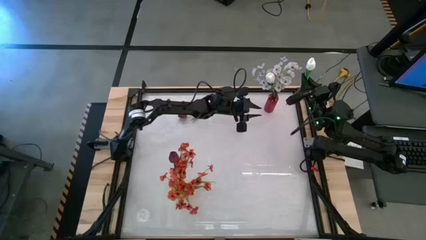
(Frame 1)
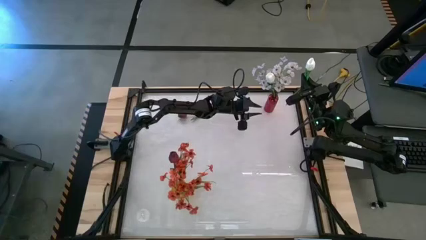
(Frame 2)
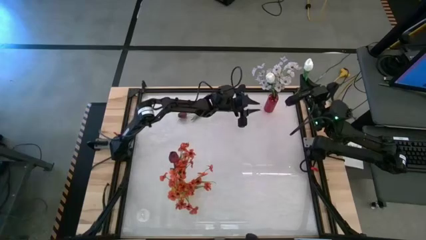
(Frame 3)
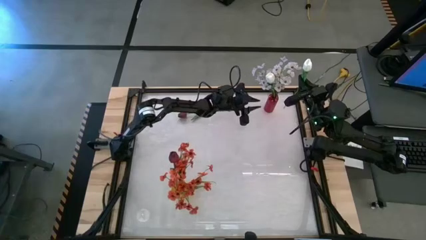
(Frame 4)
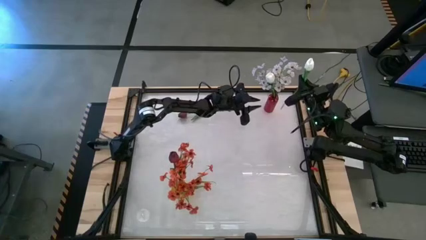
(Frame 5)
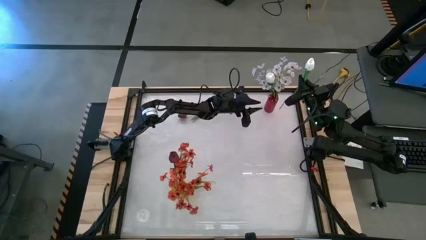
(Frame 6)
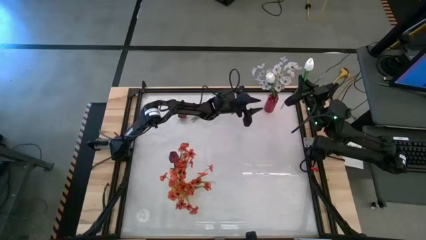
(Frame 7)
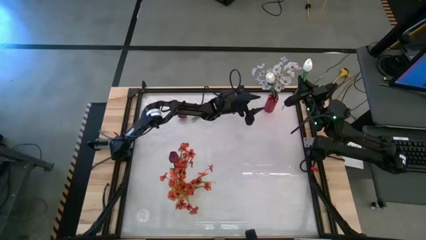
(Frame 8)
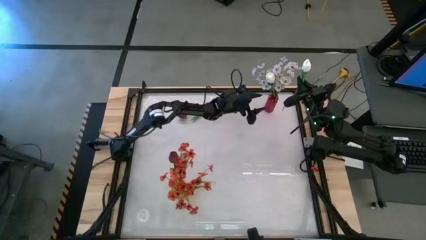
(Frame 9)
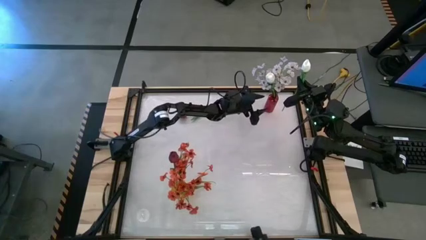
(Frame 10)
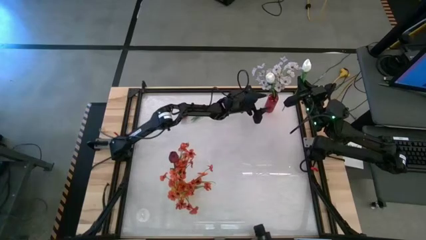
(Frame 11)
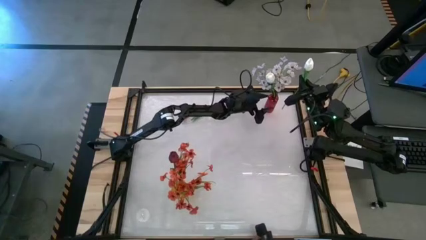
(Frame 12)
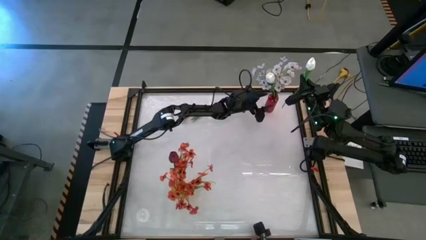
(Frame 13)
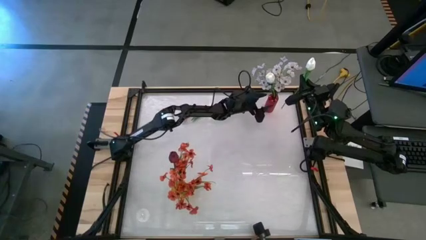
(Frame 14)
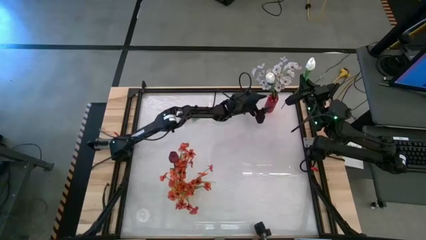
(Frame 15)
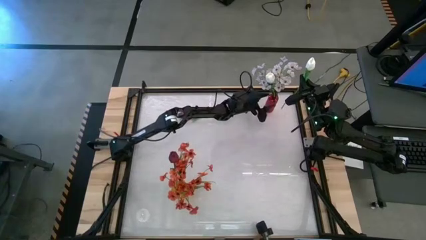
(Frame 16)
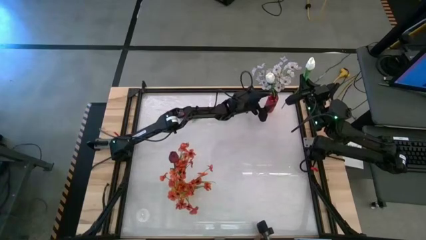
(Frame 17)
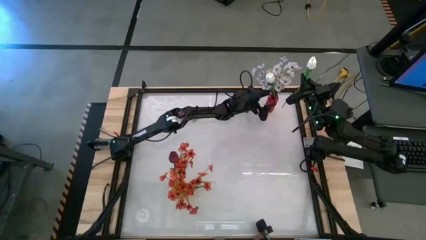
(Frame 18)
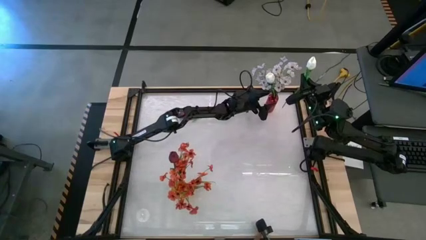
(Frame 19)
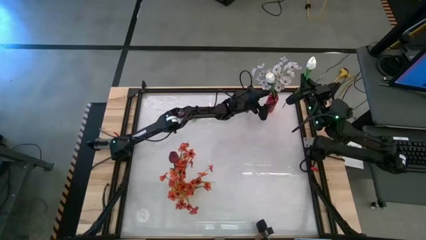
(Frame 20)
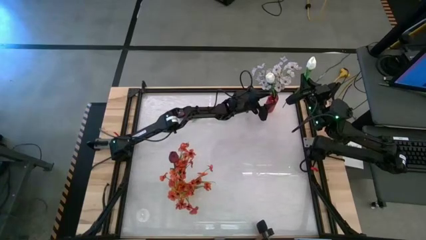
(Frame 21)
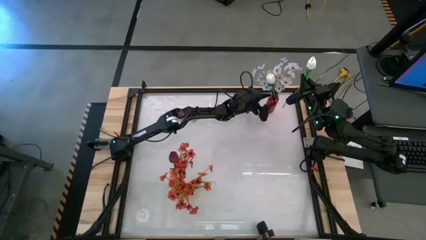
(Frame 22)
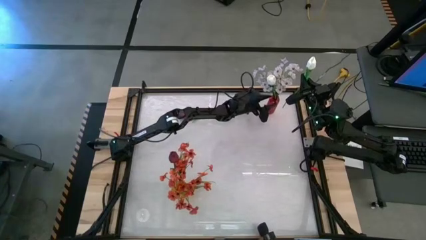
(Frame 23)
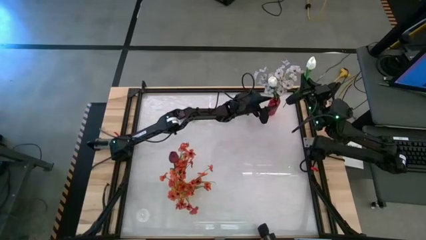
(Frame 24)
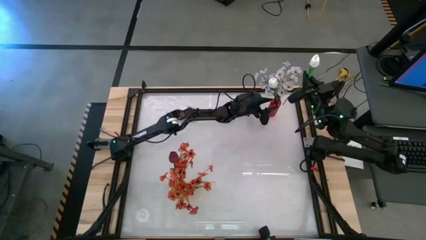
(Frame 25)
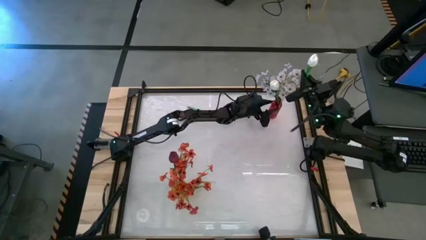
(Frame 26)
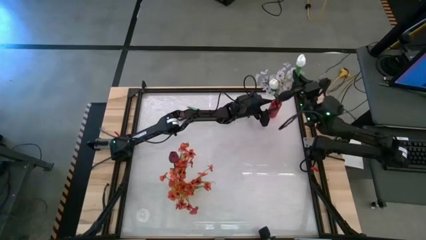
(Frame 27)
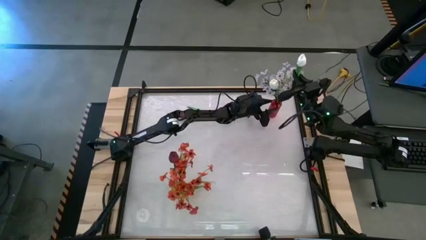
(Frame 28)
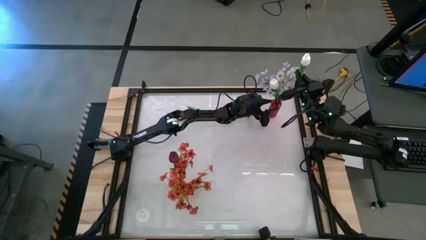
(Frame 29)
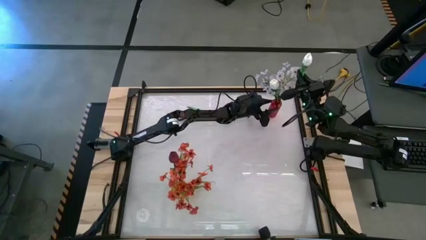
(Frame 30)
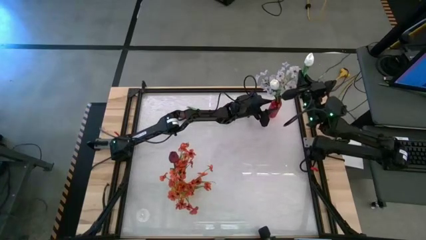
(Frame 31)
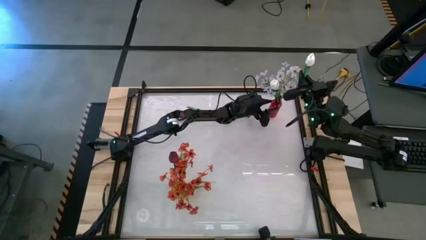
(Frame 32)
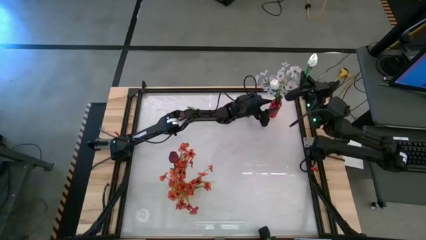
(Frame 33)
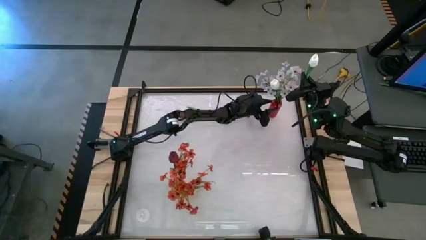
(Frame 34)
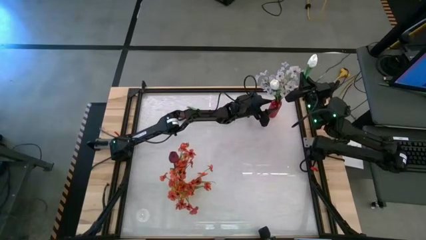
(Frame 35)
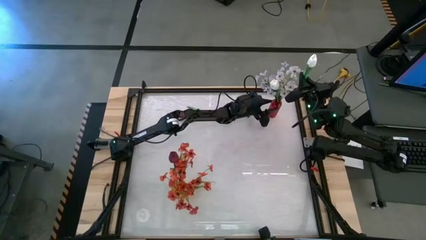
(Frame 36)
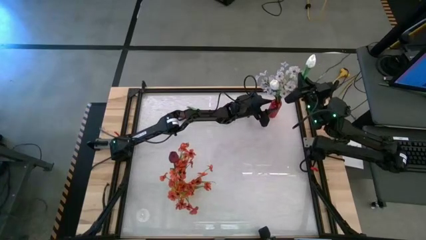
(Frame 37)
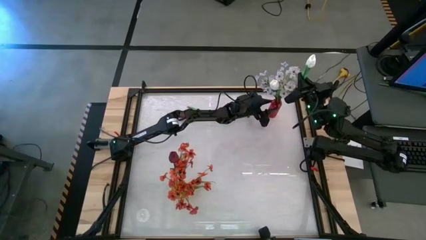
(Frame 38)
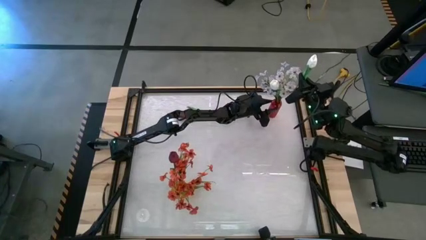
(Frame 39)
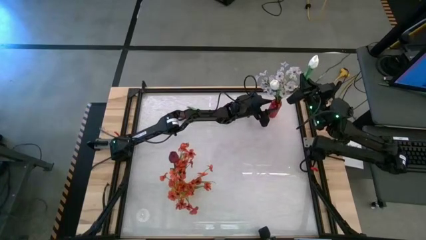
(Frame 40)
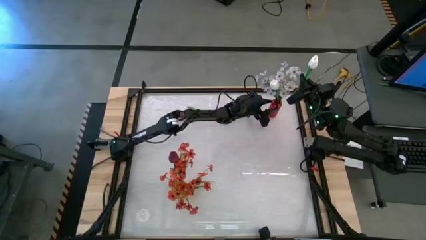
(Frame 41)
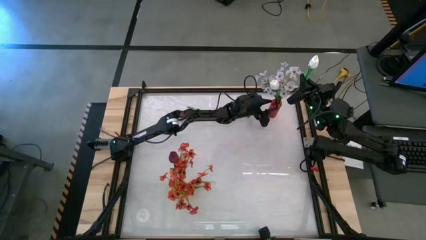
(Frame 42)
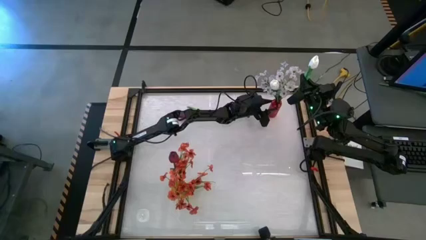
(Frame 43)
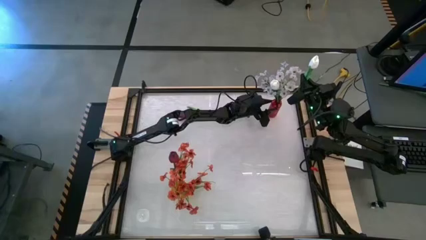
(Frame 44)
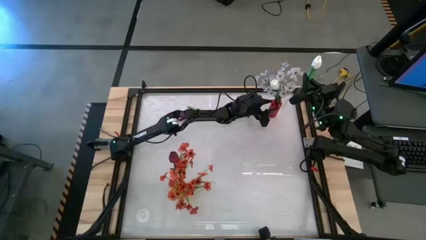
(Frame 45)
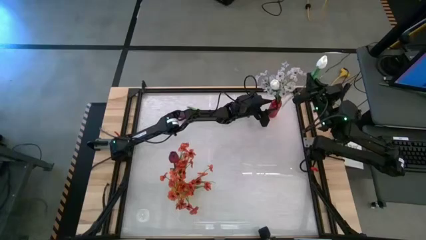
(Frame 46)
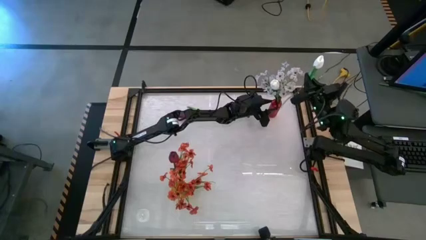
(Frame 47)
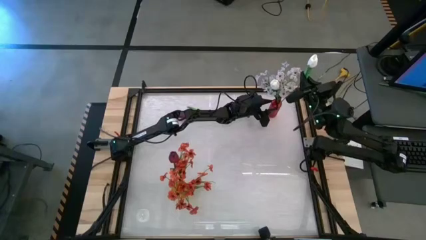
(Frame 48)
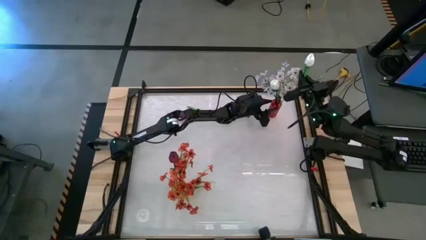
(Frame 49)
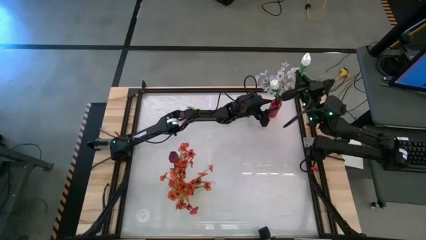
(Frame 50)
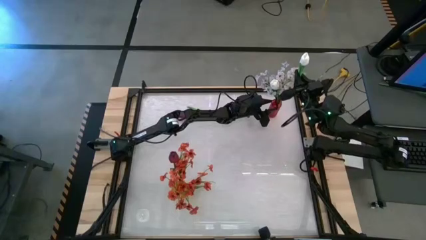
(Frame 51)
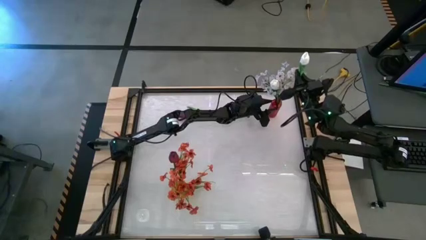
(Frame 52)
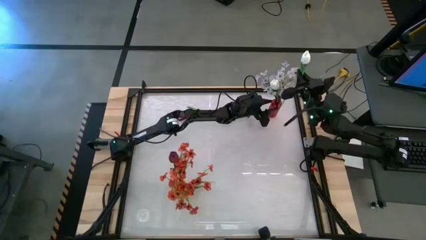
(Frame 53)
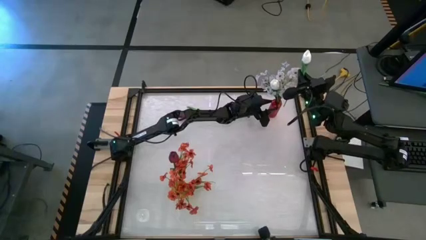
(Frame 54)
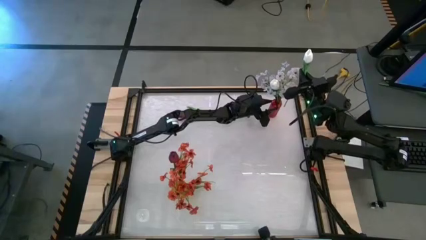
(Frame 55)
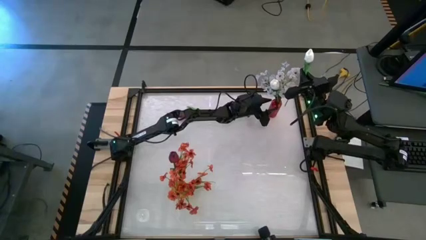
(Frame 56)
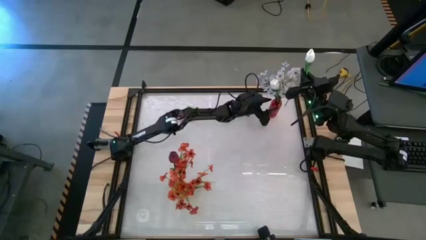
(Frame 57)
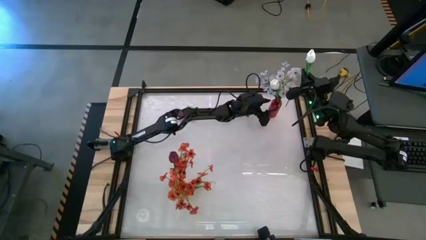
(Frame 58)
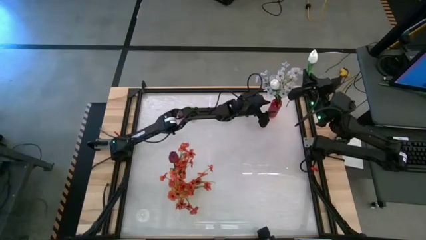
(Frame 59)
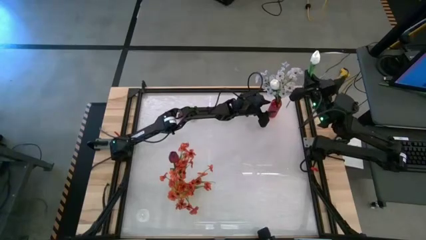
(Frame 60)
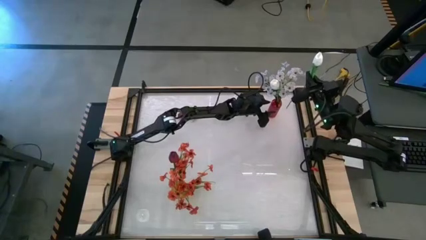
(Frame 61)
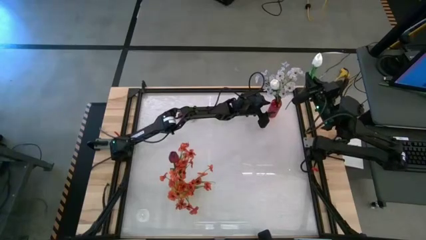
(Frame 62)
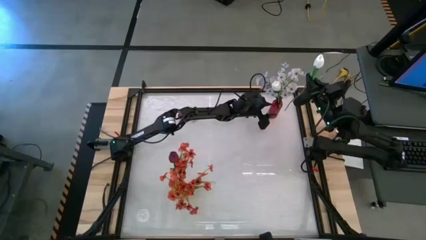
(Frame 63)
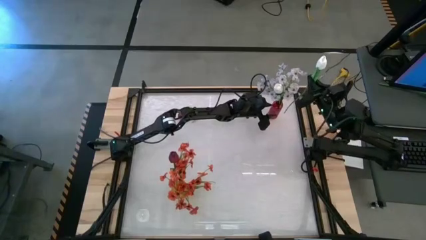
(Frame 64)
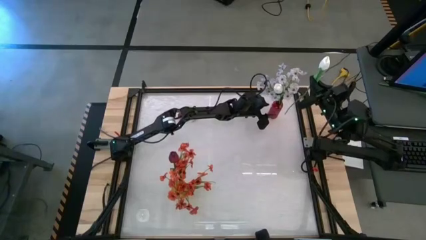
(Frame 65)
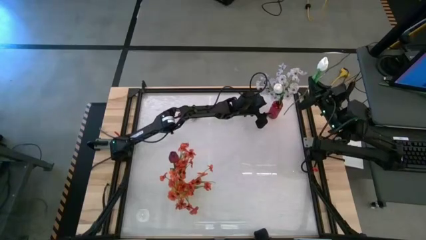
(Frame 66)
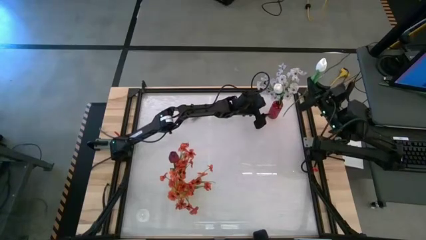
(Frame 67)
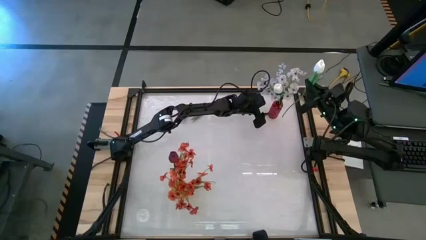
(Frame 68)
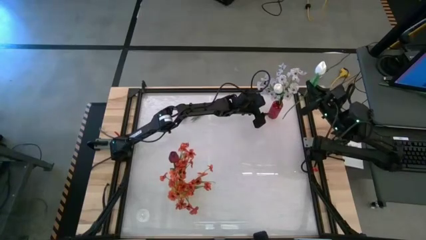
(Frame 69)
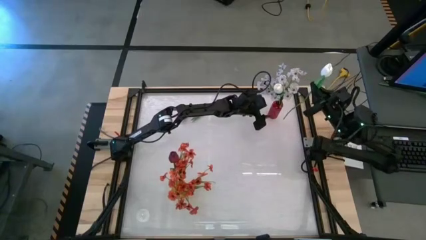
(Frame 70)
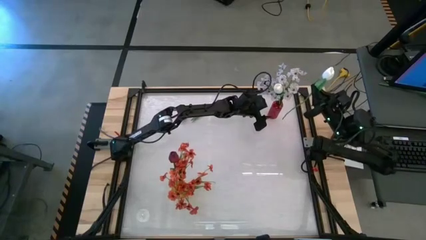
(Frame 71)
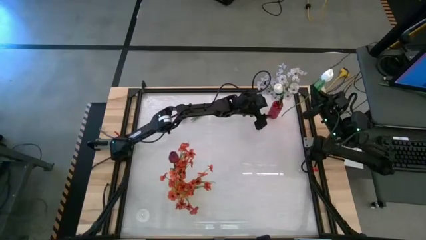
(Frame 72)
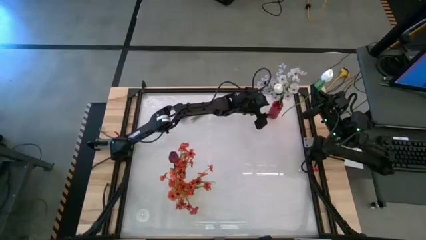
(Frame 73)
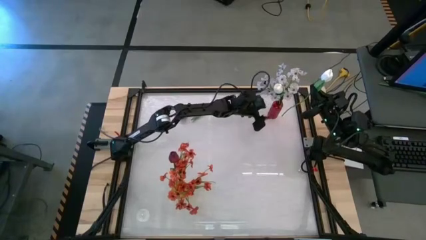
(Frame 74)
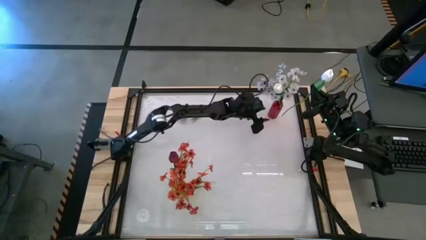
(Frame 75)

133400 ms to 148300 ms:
Task: Sort flowers into vase by color
Put the white tulip into the red vase
